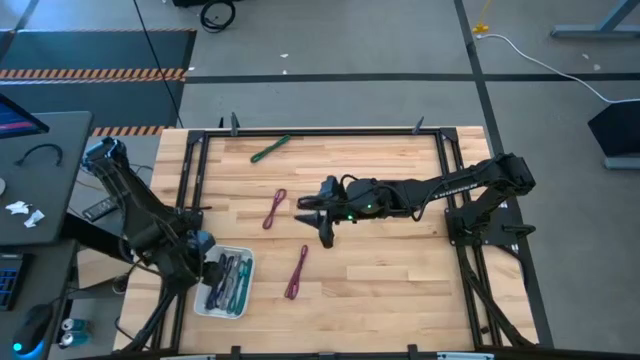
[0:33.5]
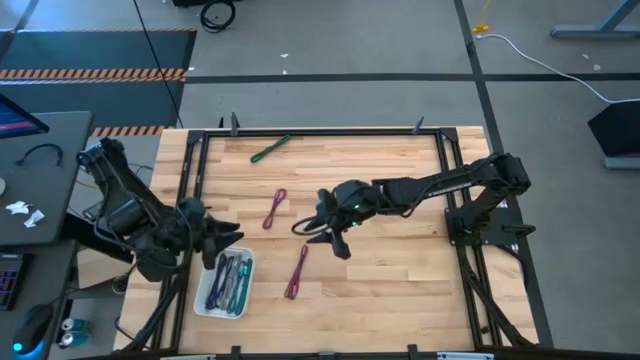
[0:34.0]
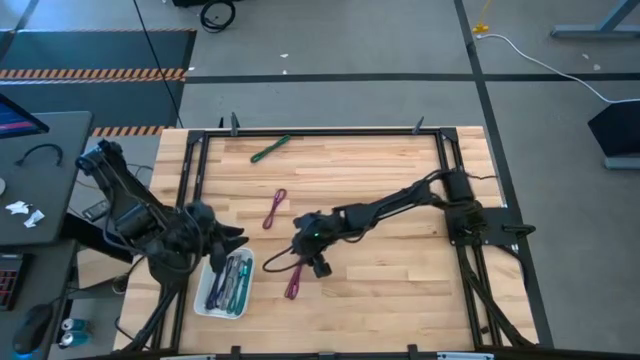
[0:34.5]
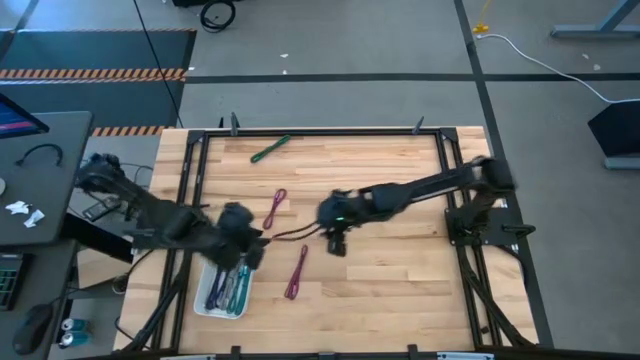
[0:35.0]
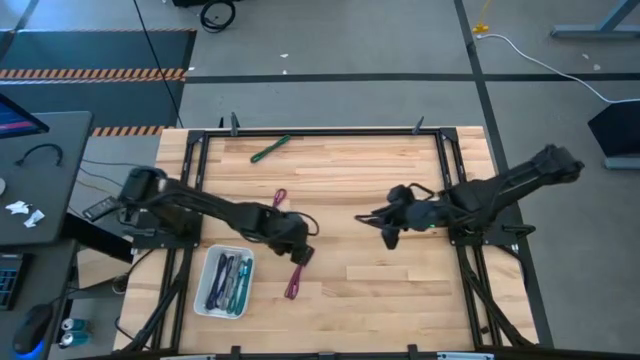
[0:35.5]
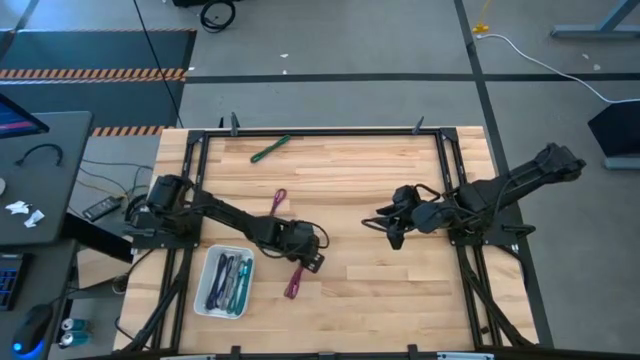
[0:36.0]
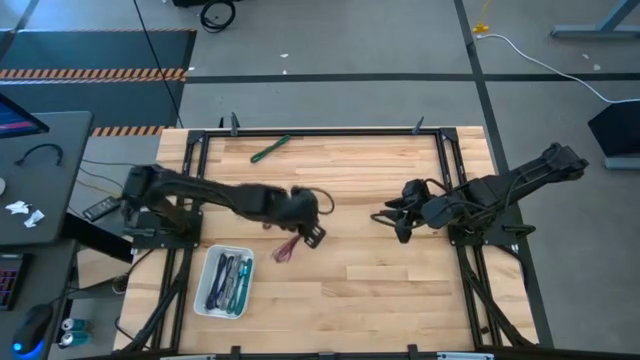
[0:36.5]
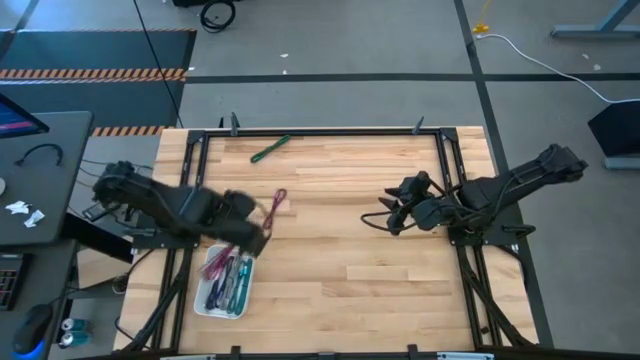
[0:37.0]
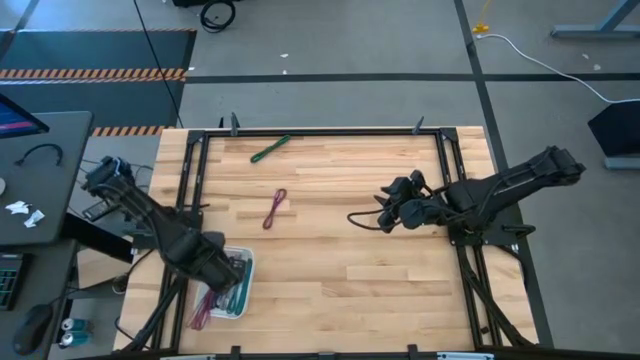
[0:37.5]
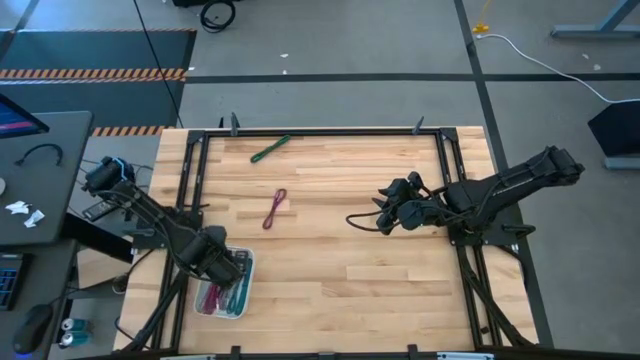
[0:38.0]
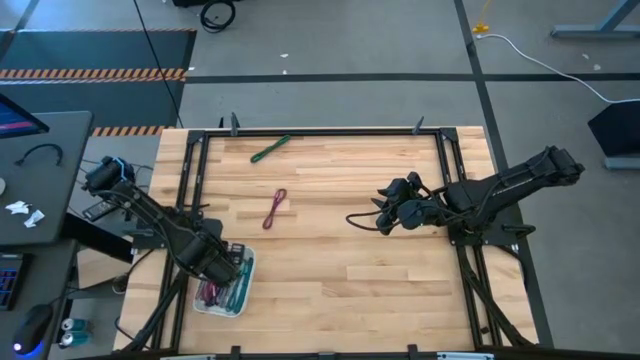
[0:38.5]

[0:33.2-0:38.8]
Task: Pick and place USB-C Cables
Put the bottom pink charger cable into the white bin

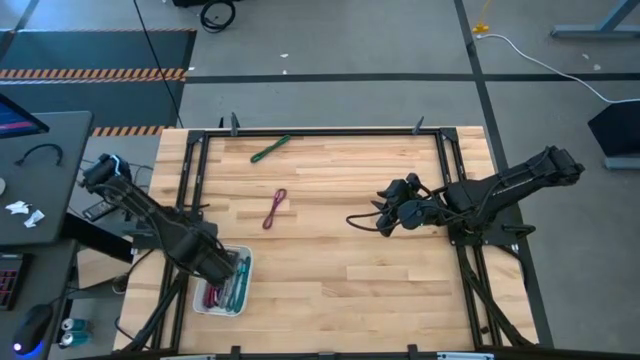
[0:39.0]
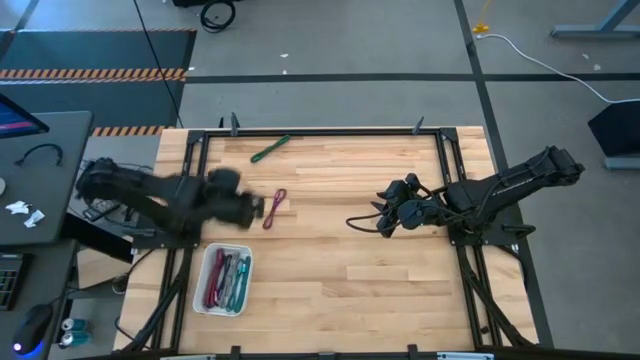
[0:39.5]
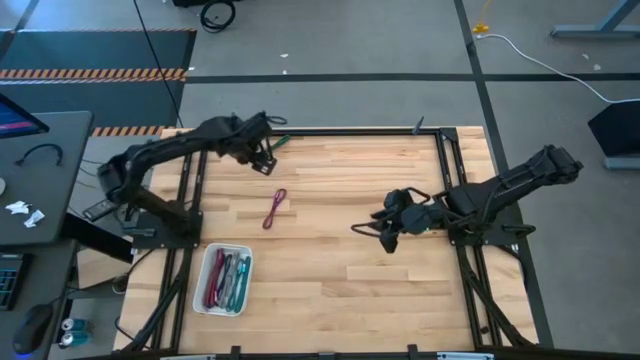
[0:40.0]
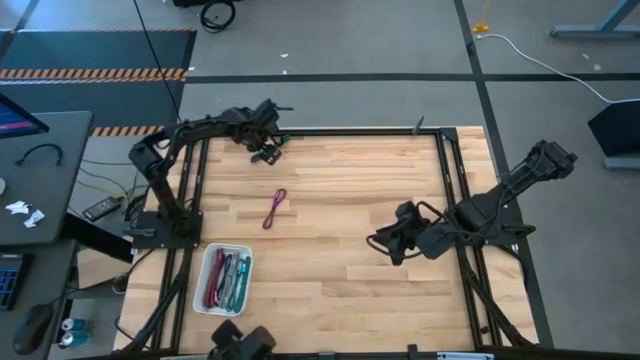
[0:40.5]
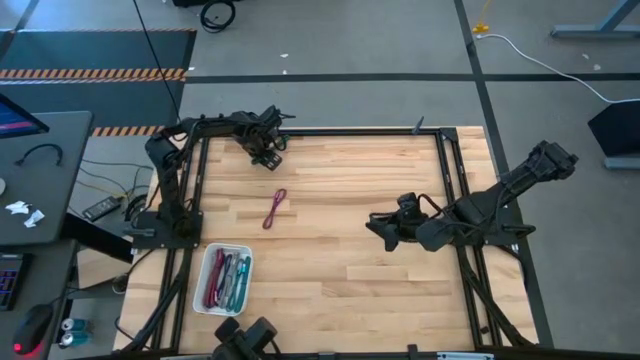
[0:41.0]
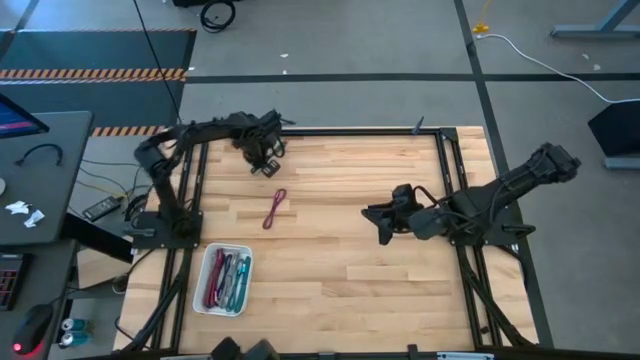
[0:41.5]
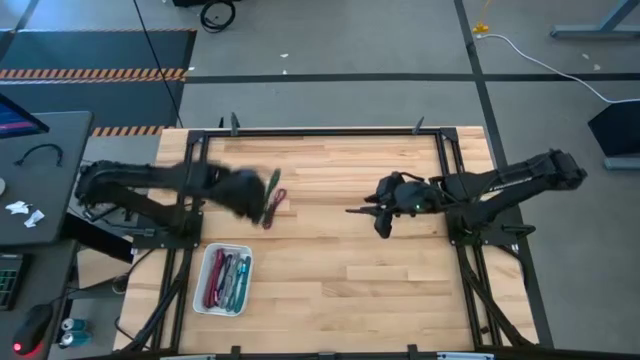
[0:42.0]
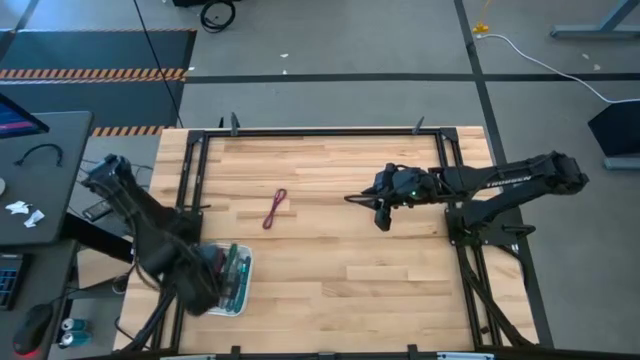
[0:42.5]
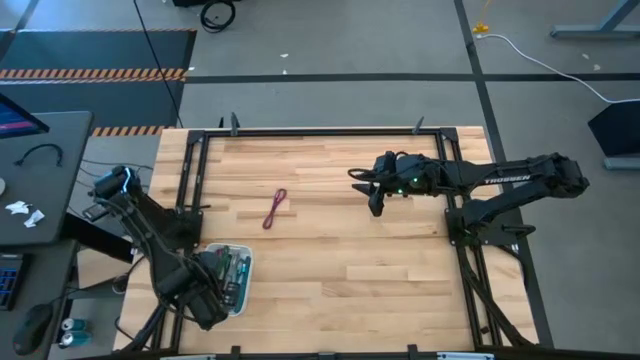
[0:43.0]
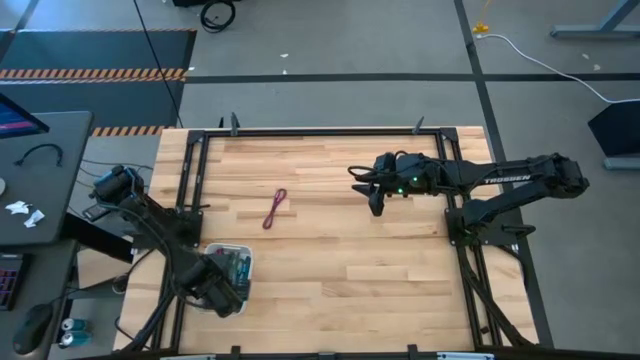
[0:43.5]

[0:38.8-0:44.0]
Put the green charger cable into the white bin

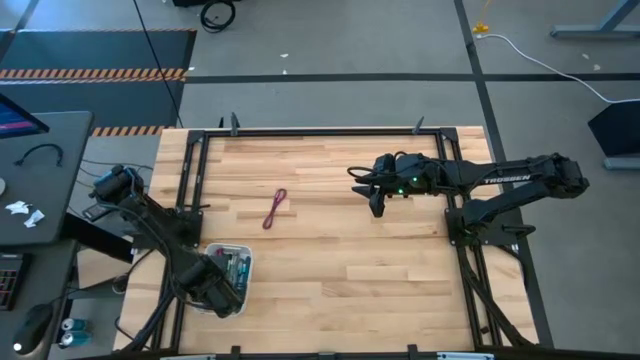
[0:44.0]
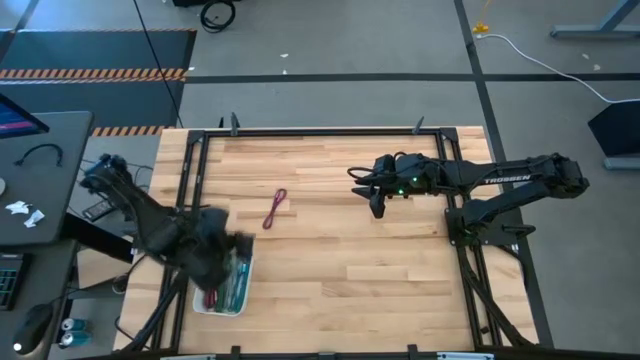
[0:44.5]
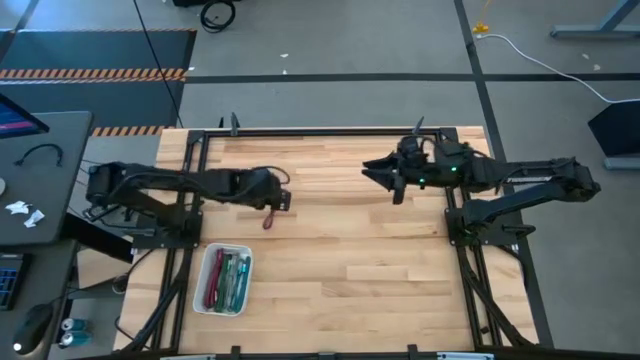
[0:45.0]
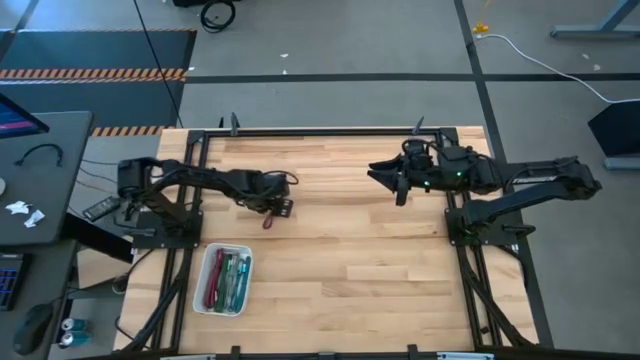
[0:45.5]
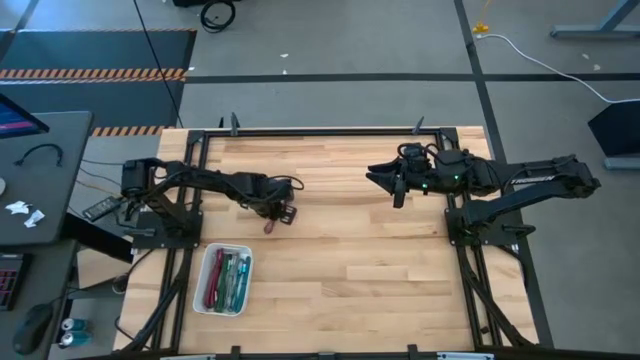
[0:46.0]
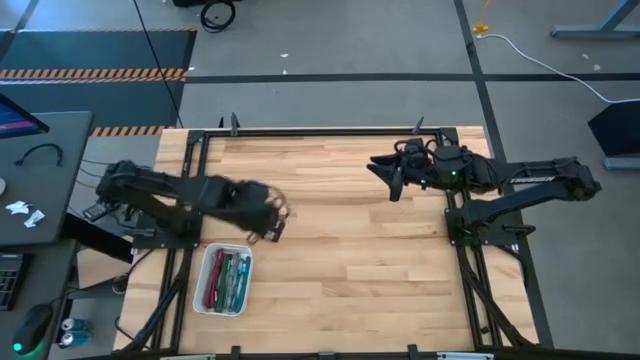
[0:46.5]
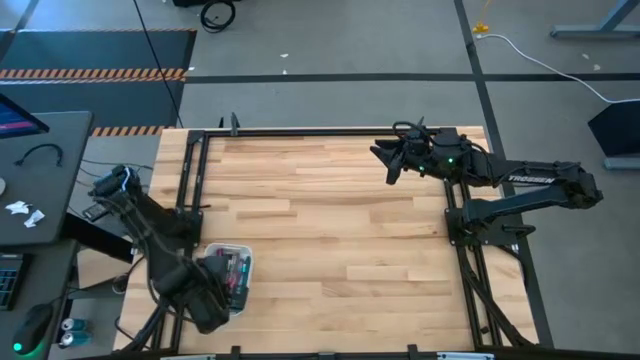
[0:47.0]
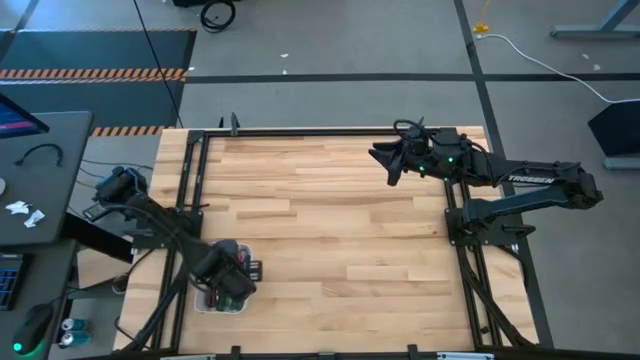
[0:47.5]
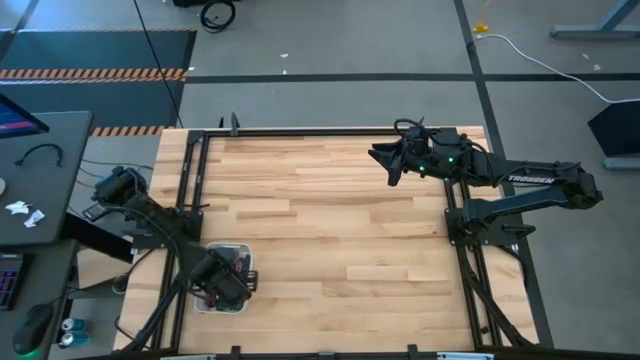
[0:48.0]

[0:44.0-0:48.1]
Put the pink charger cable into the white bin

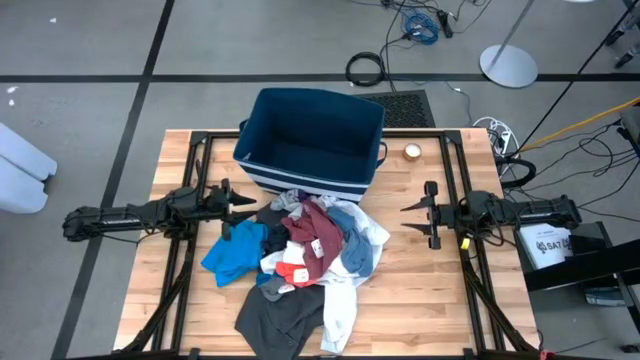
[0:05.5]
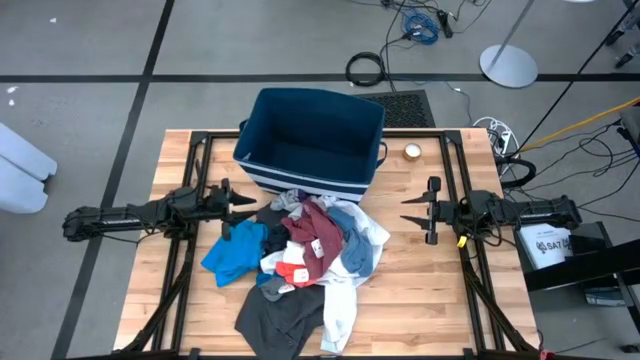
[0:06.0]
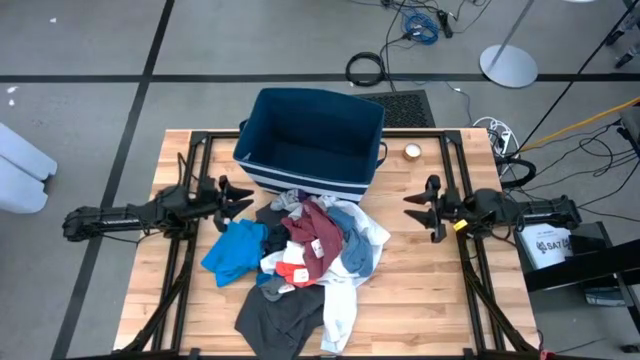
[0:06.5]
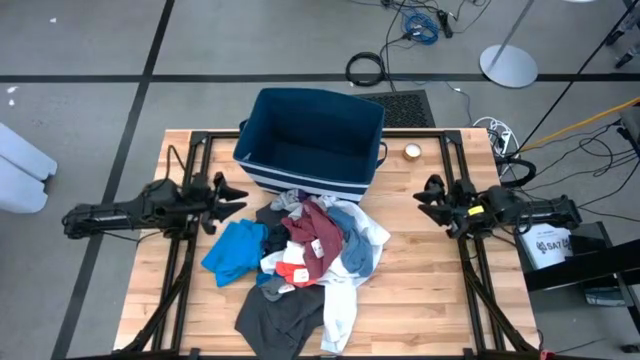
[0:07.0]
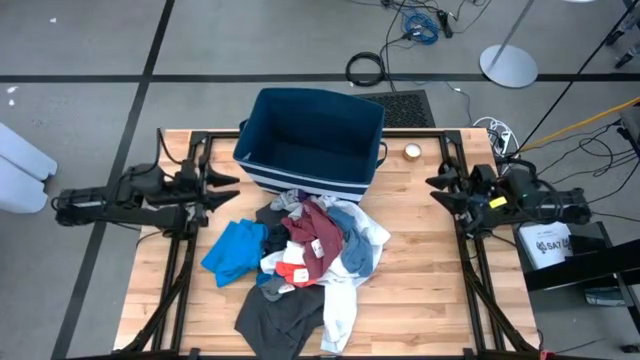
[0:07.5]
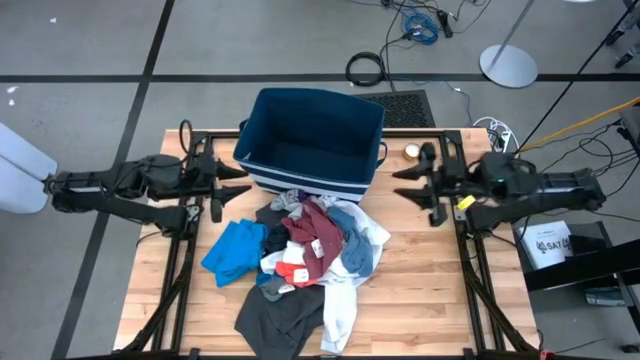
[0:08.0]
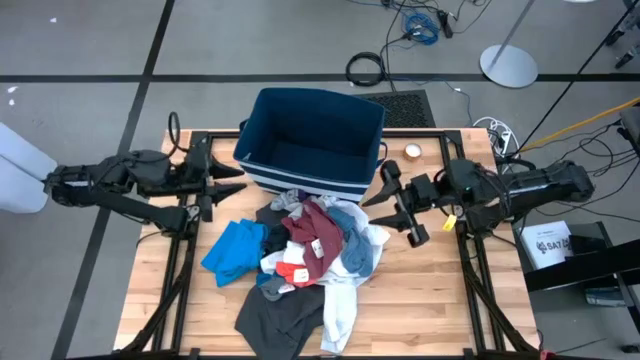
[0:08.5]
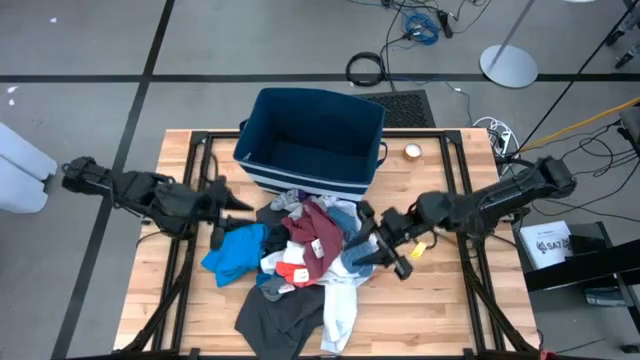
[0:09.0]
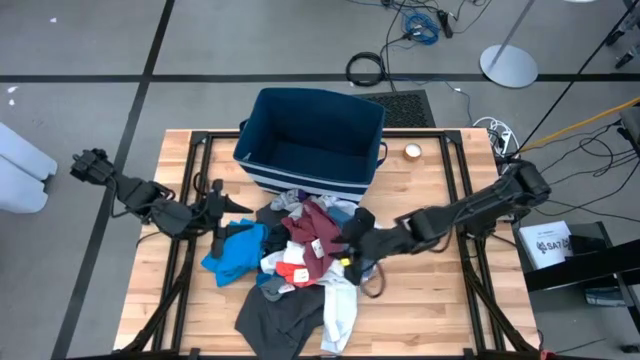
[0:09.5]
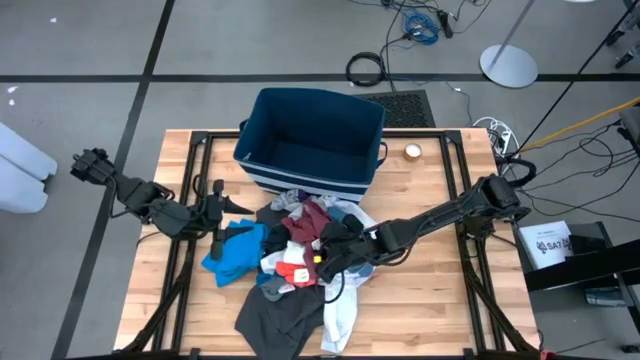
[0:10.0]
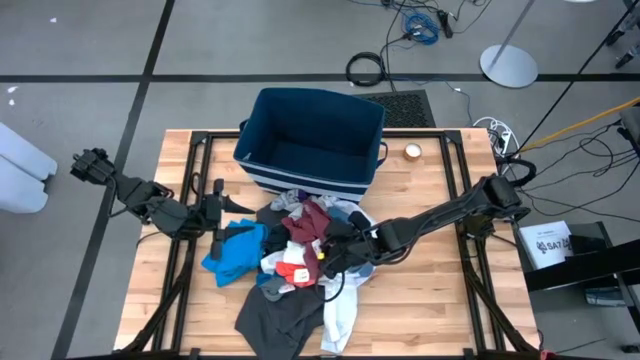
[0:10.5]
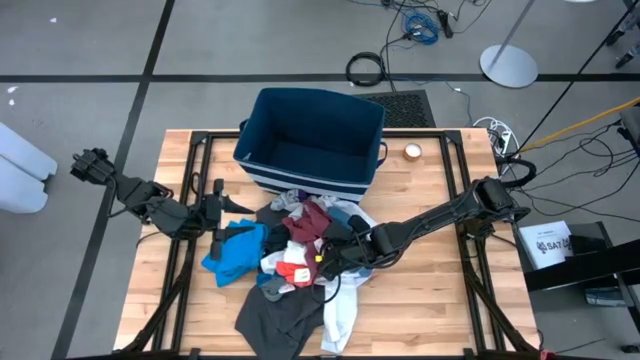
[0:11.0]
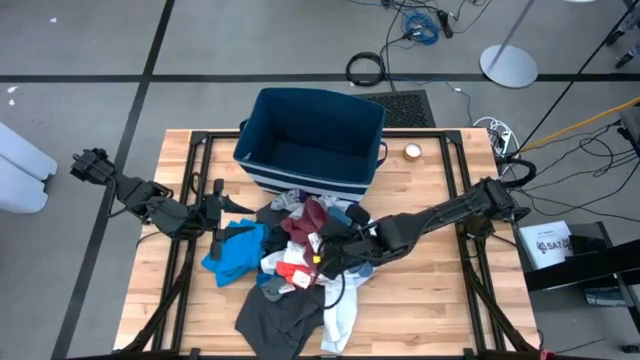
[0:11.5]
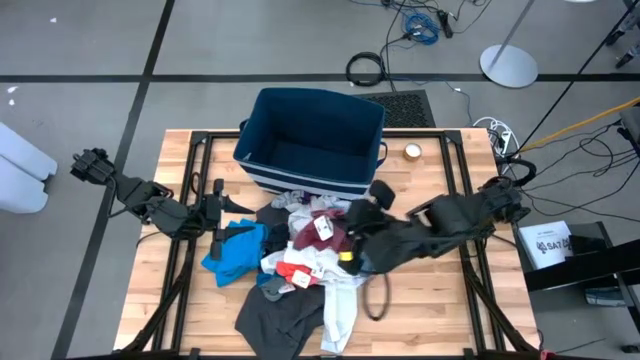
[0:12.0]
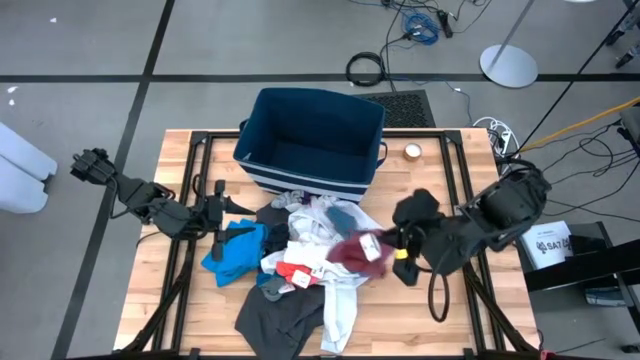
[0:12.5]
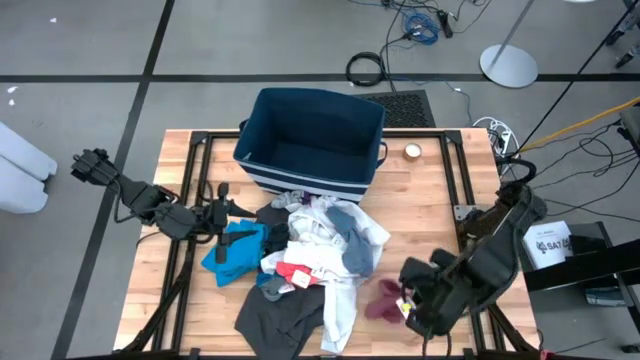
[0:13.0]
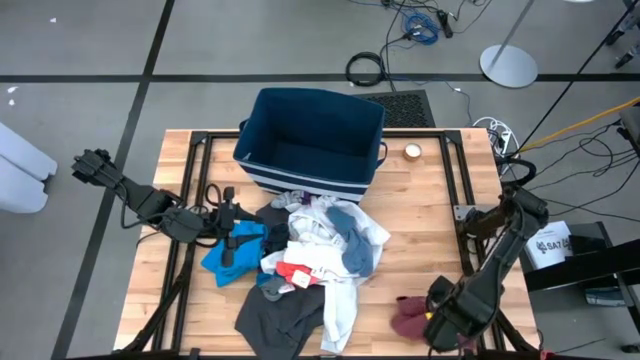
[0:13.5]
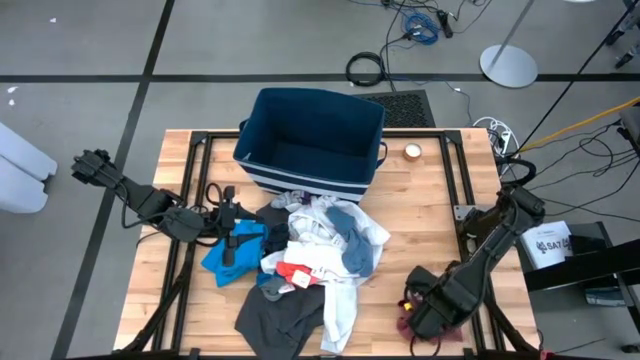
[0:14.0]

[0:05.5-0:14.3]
Task: Sort clothes
Move the red underwear to the right of the table
